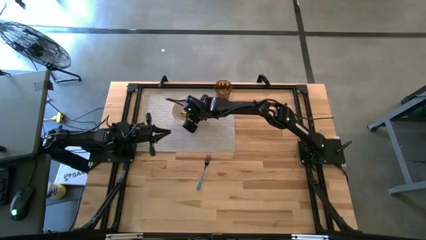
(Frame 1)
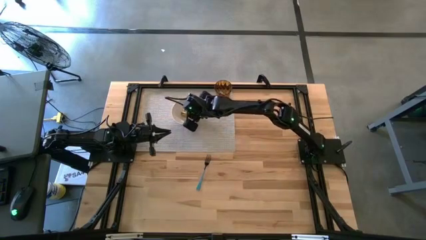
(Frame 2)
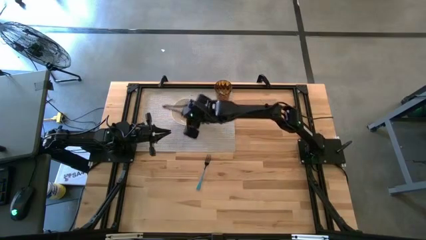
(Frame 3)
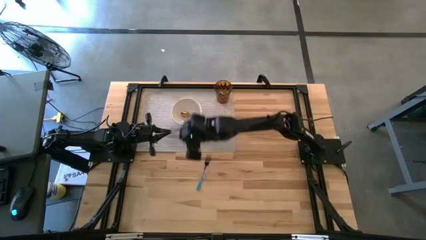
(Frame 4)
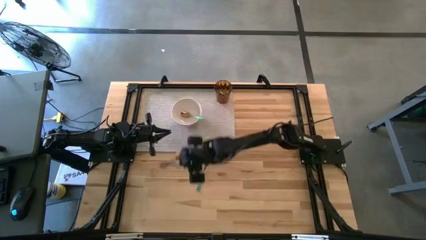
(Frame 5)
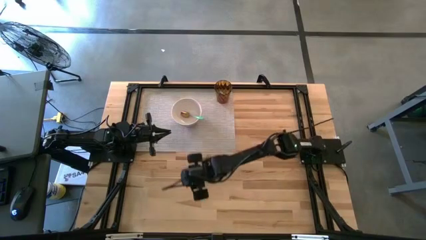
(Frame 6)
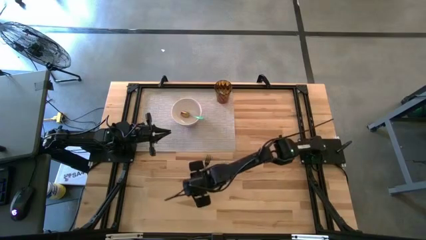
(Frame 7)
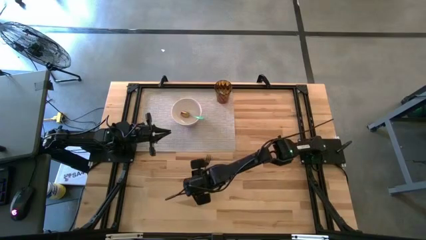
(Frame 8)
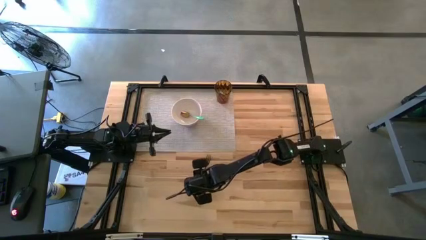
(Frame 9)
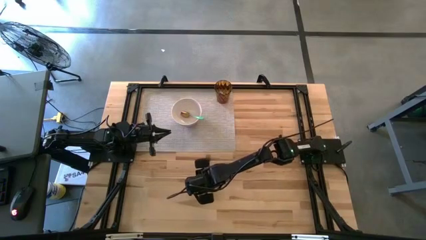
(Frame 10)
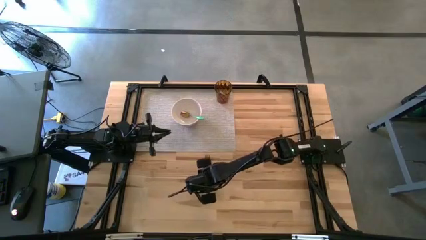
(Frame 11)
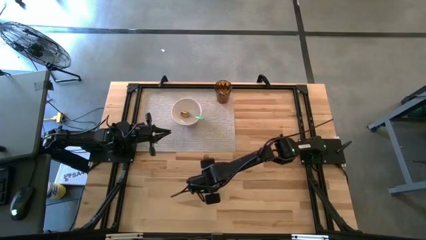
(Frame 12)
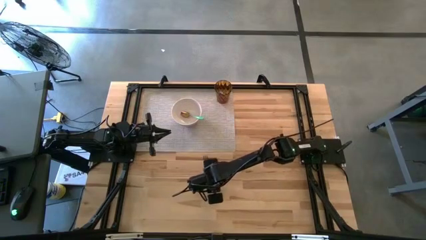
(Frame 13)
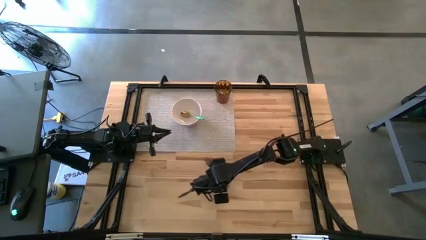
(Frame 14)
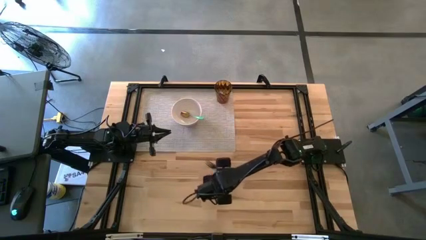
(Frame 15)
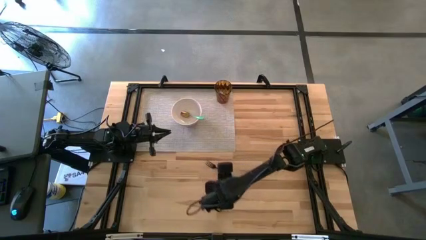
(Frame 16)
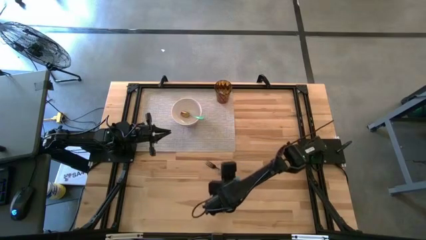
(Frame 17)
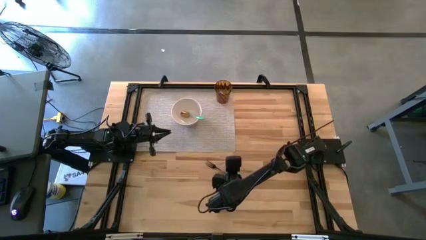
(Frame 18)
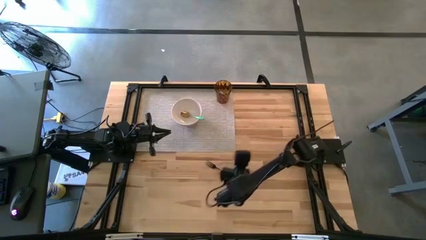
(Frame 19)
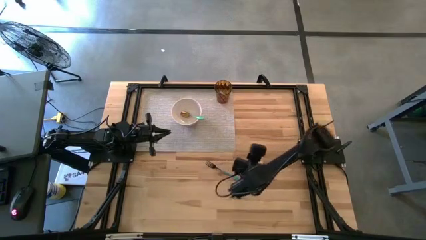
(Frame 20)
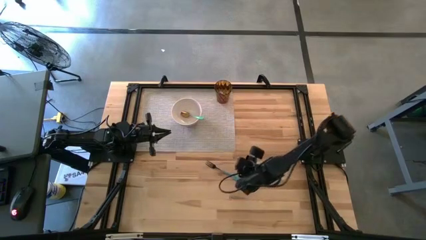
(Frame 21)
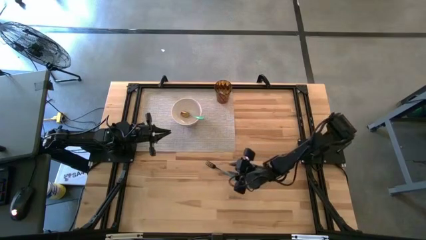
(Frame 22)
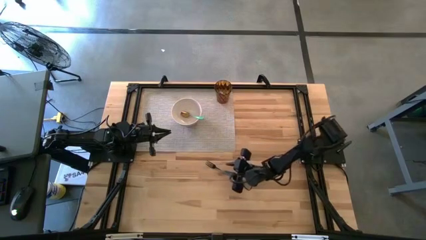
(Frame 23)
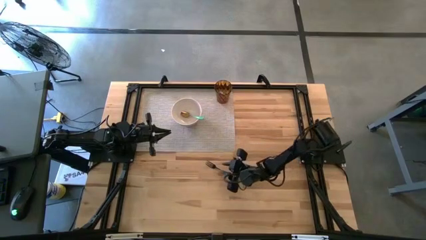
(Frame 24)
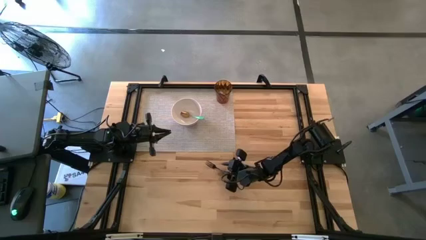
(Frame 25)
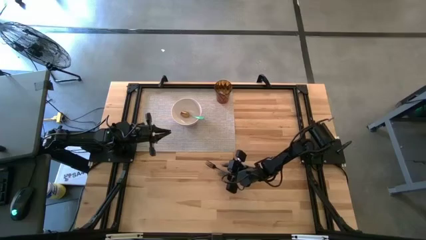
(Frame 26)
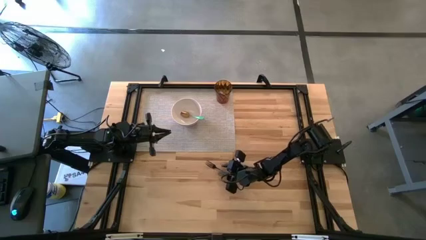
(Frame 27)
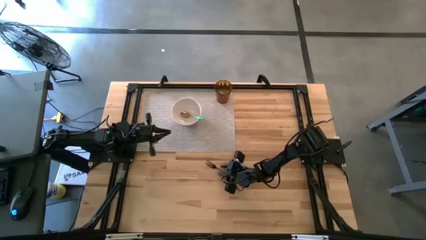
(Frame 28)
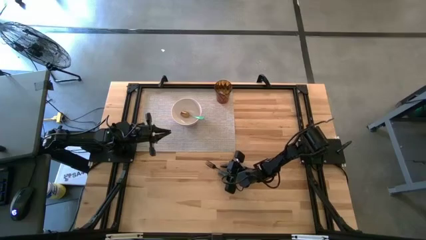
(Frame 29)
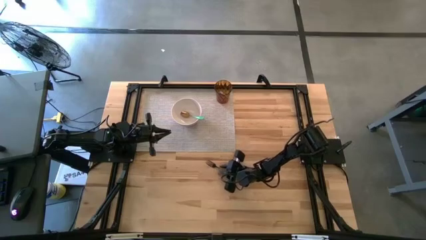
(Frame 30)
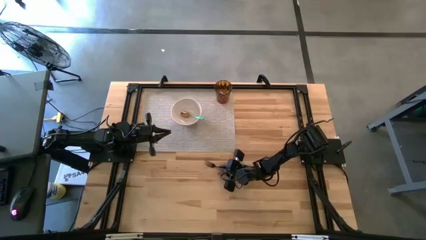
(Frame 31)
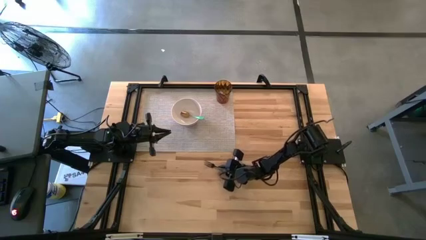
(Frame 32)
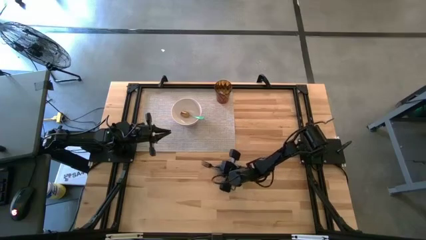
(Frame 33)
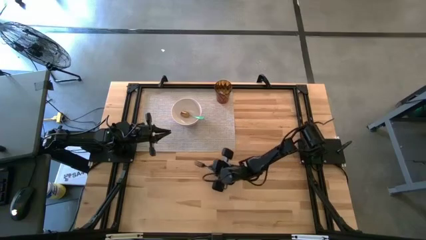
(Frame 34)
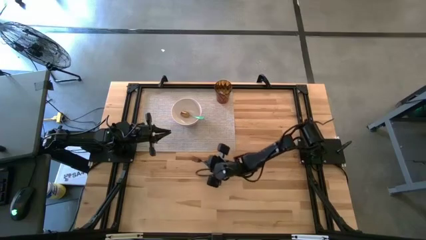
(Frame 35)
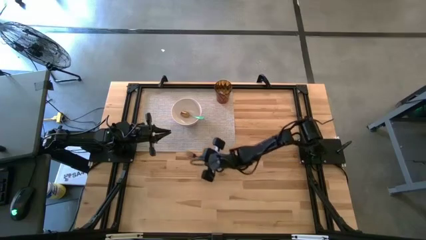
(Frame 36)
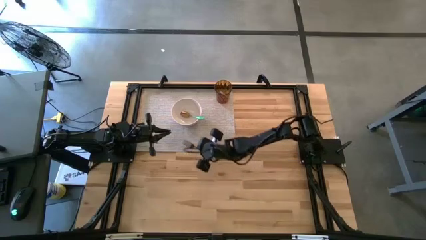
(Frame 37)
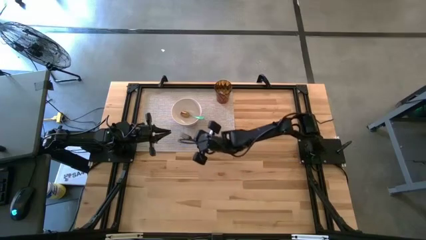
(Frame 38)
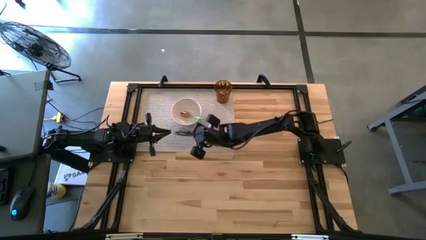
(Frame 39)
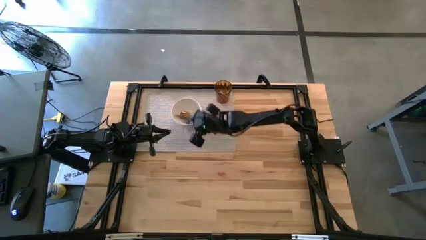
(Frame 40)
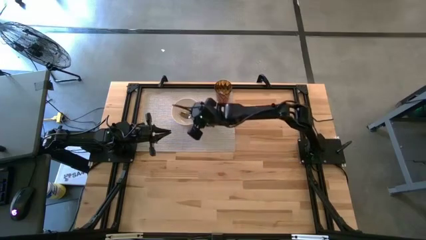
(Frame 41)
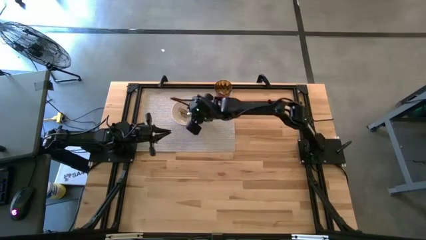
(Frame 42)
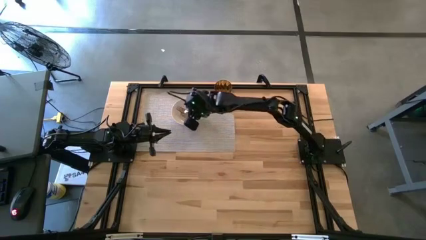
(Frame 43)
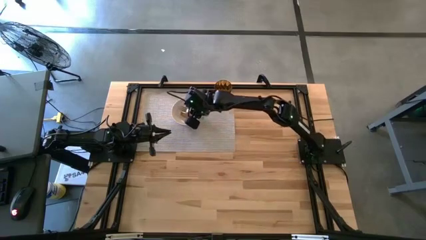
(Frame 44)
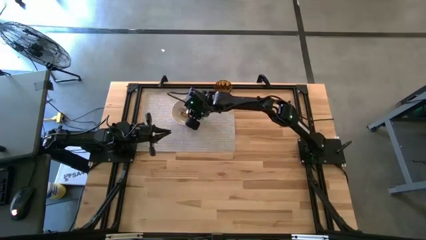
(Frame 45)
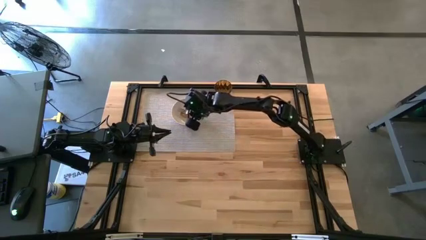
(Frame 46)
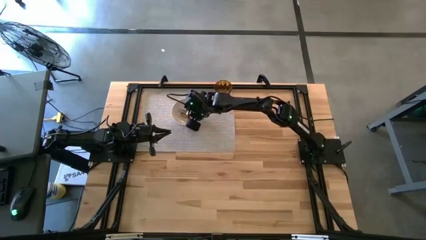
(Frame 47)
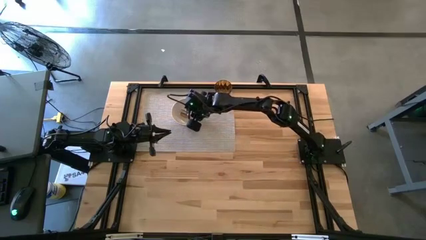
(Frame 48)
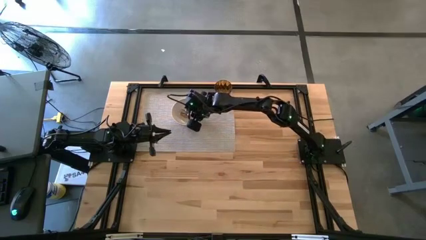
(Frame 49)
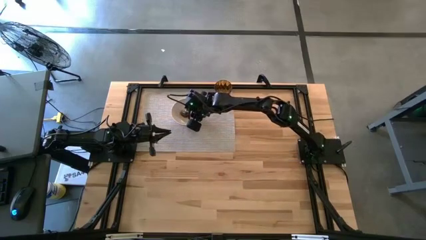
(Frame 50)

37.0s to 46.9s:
Task: Pick & Place Utensil
Put the blue fork into the white bowl on the gray mat

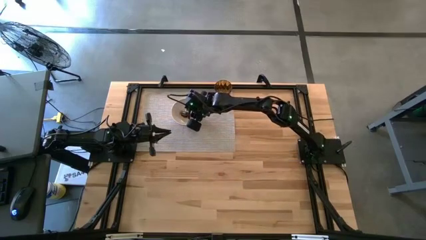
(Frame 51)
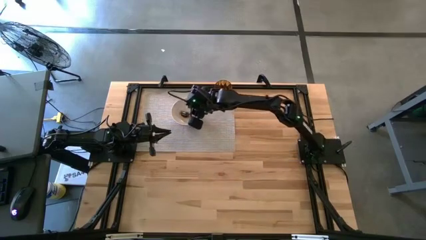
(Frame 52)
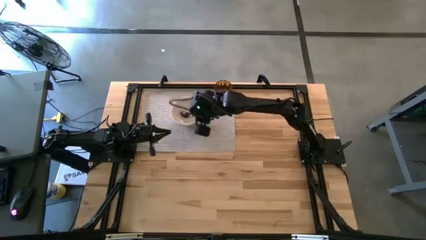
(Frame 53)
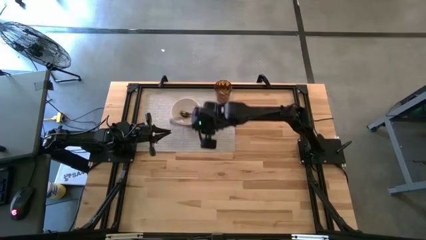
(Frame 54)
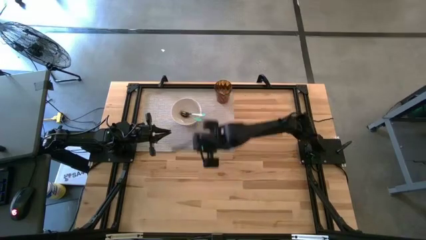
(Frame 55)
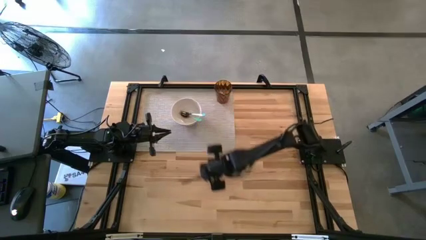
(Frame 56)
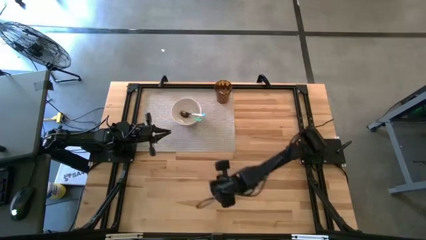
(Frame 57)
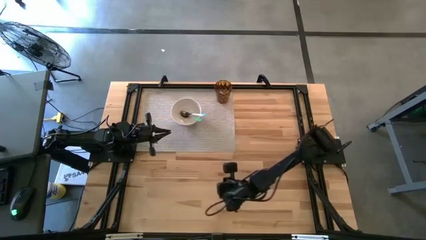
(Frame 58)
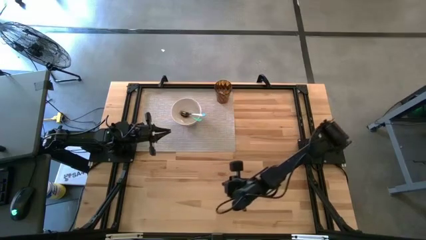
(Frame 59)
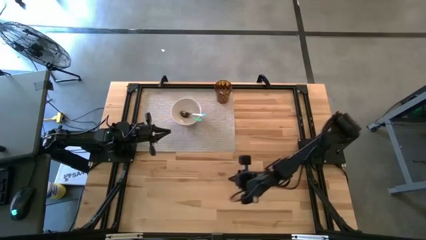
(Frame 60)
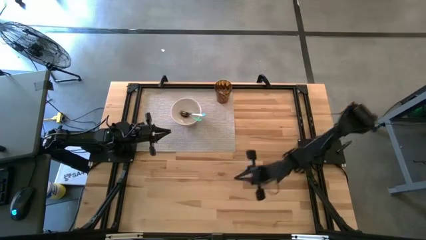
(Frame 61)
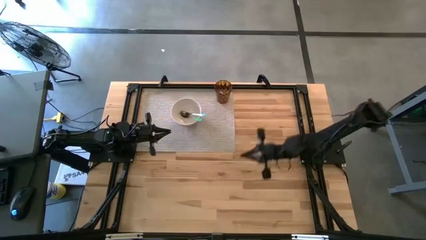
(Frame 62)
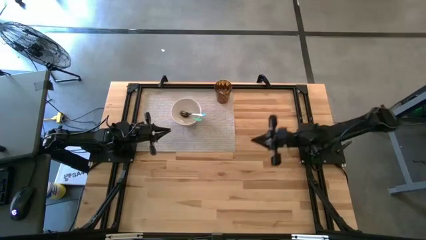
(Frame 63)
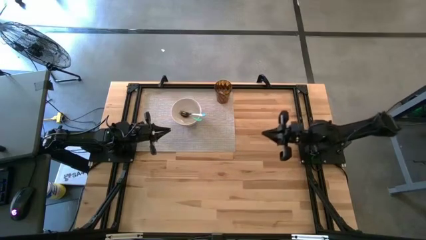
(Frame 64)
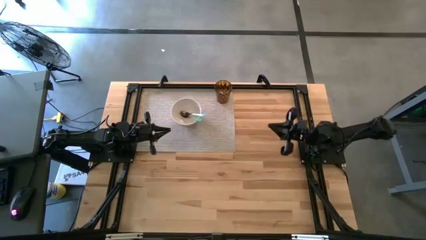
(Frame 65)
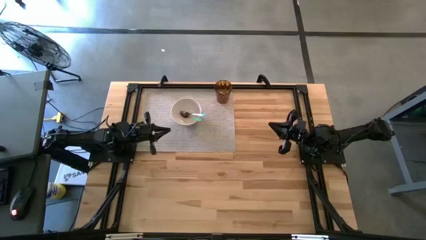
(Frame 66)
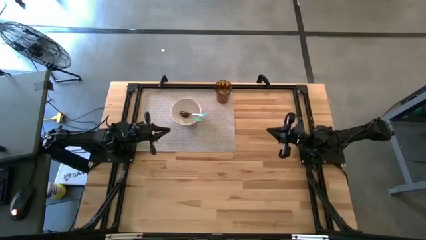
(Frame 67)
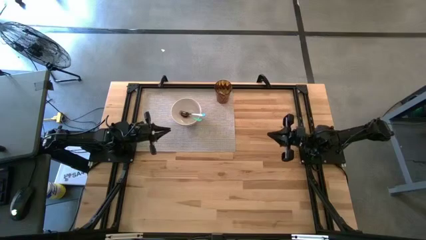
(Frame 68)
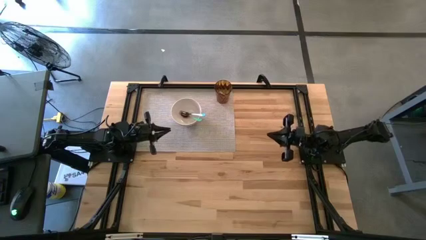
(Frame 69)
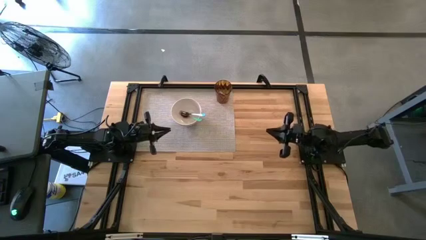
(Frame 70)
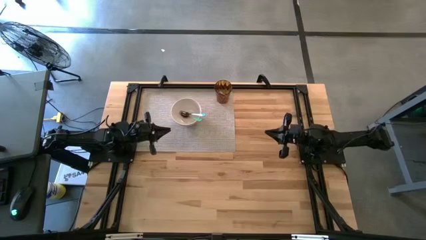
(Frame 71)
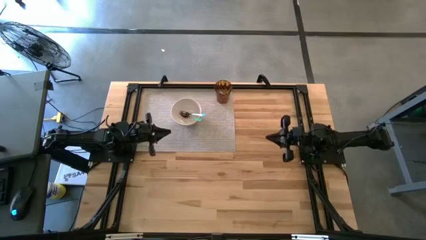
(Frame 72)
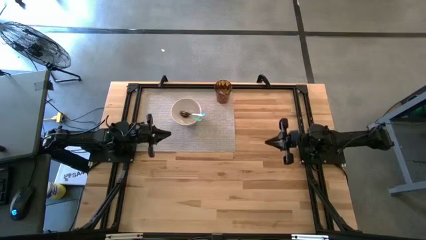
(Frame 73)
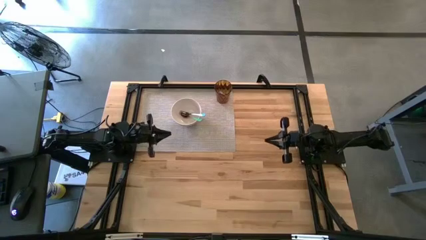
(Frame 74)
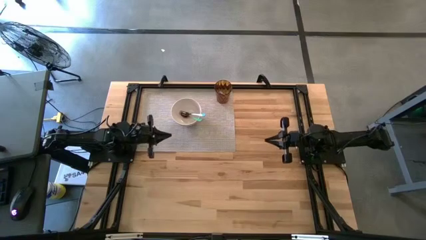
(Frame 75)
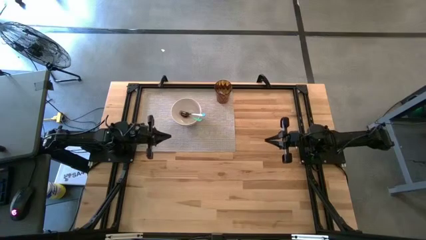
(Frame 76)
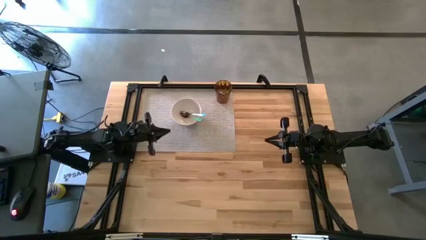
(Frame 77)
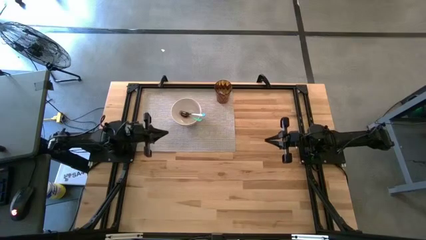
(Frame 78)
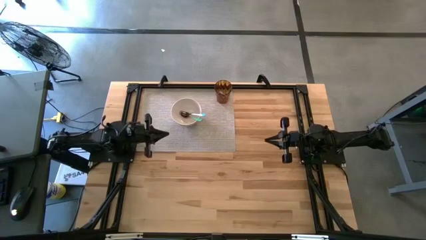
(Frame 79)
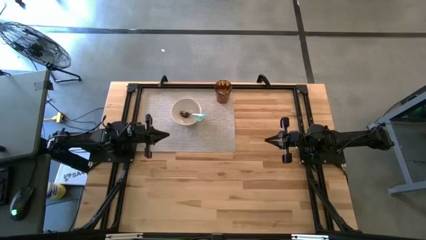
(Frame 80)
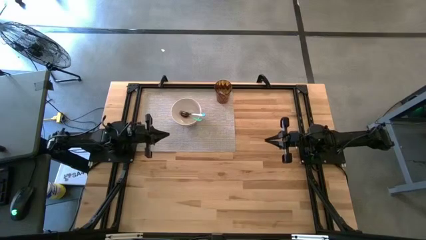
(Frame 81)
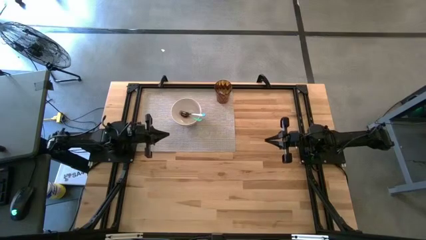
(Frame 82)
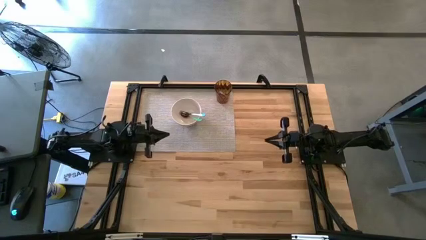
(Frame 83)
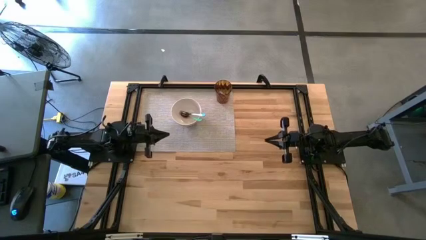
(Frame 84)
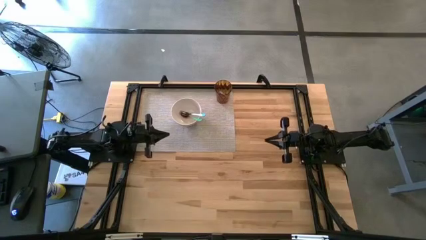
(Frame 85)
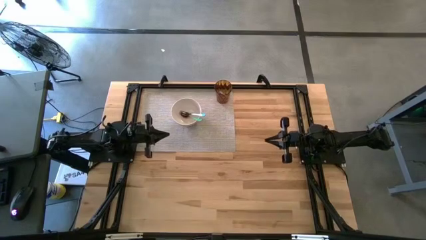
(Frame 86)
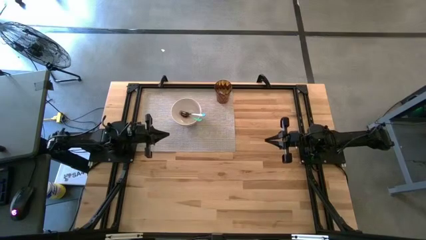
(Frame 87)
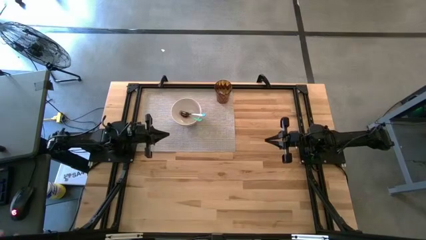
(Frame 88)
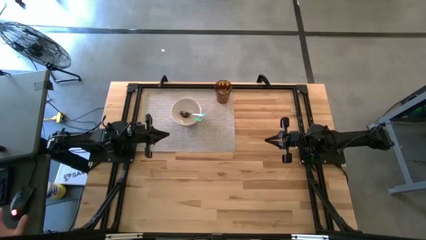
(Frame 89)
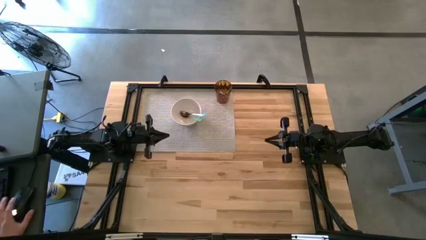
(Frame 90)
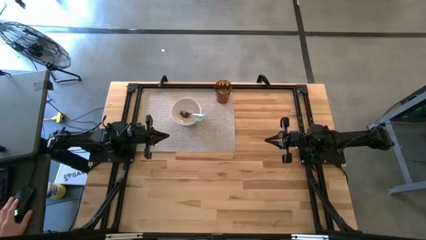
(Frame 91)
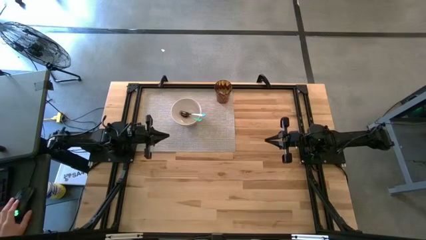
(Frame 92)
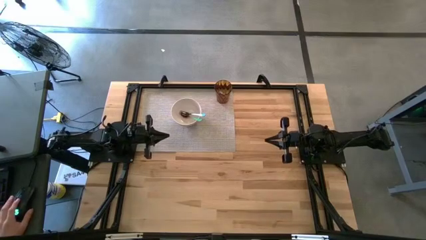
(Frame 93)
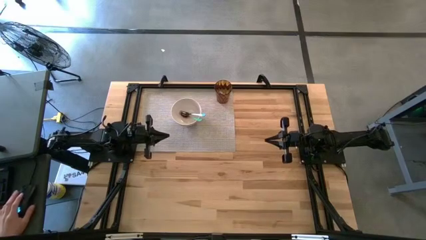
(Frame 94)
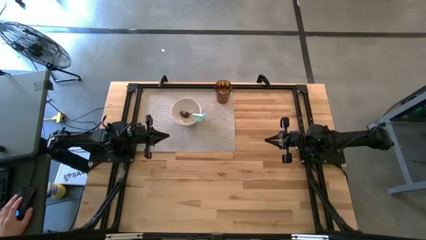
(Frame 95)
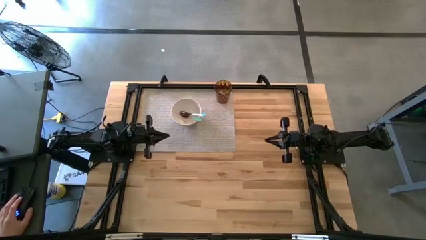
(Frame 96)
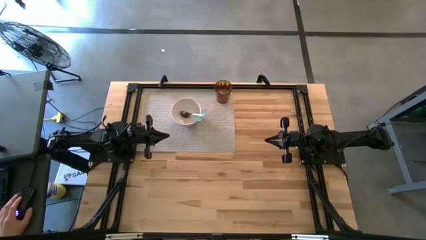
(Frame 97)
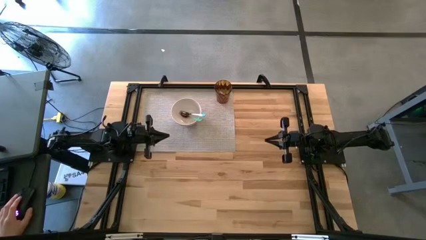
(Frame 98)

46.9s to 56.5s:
Return to Home Position
